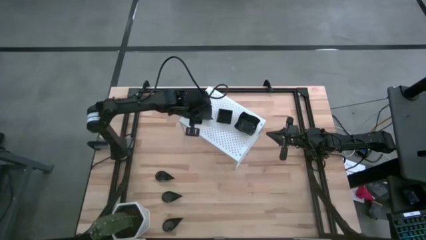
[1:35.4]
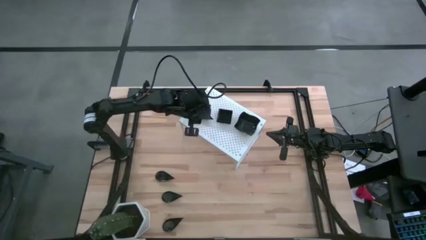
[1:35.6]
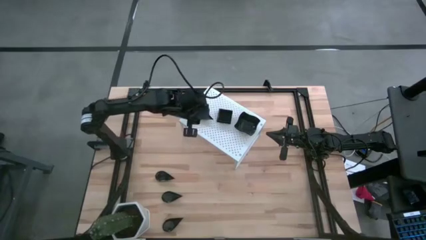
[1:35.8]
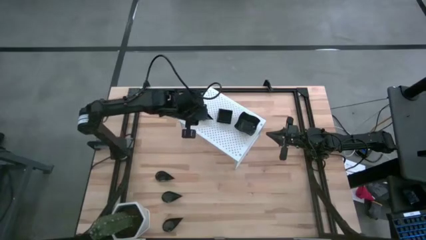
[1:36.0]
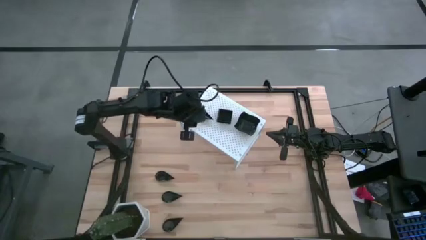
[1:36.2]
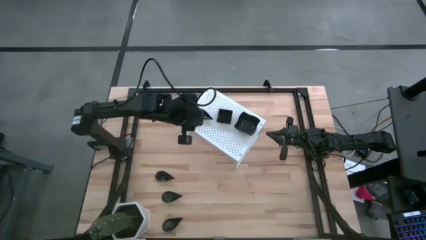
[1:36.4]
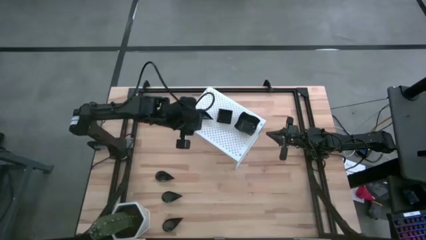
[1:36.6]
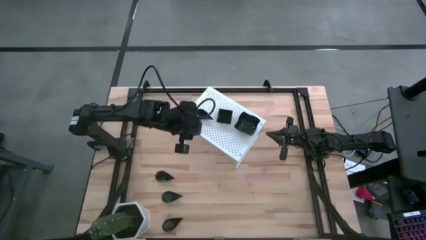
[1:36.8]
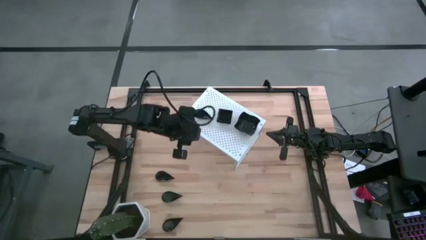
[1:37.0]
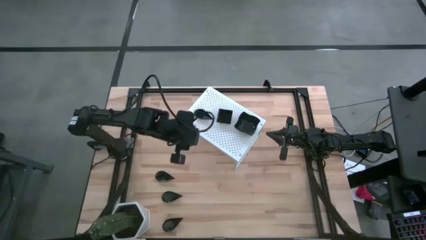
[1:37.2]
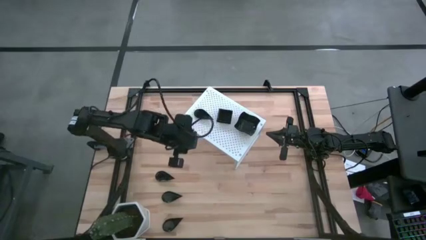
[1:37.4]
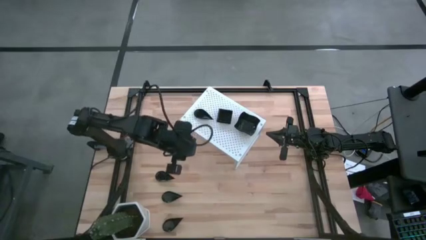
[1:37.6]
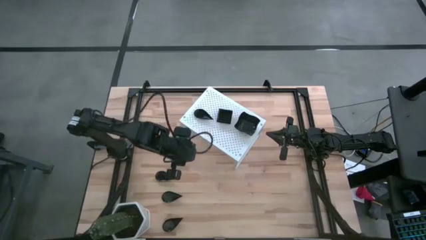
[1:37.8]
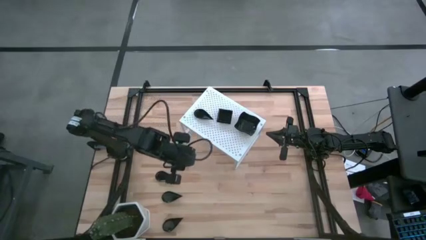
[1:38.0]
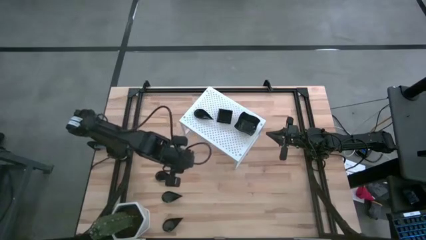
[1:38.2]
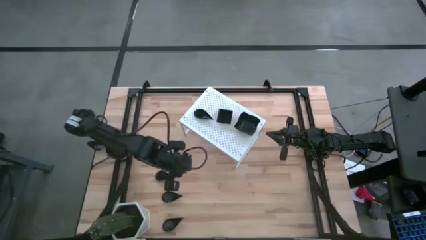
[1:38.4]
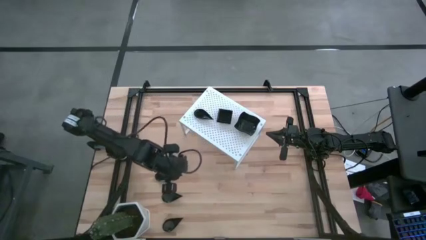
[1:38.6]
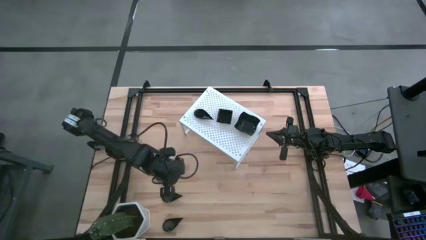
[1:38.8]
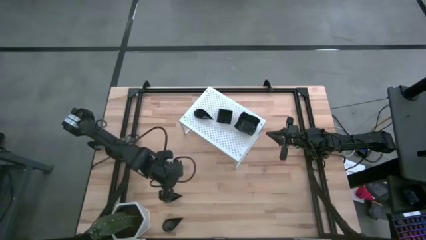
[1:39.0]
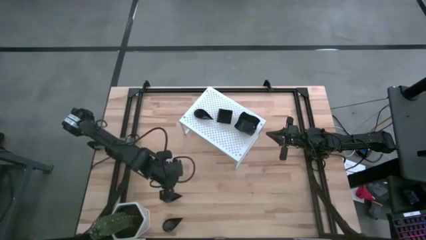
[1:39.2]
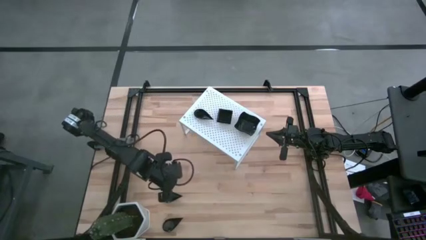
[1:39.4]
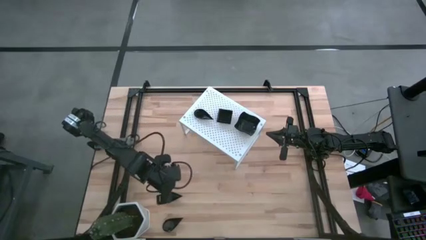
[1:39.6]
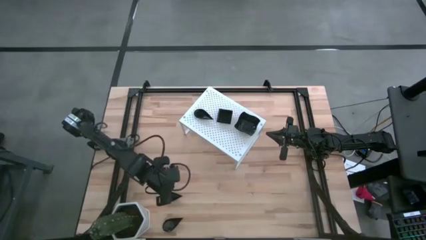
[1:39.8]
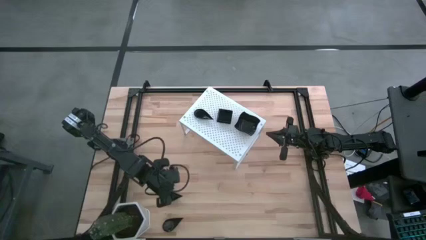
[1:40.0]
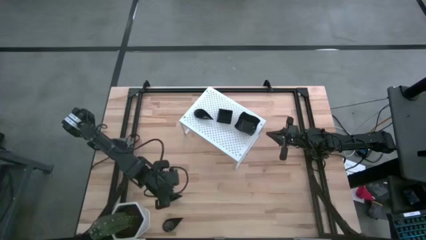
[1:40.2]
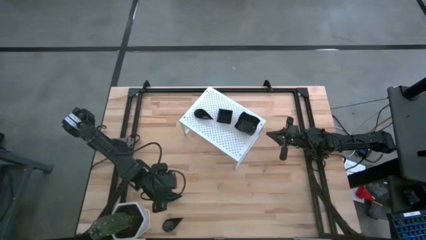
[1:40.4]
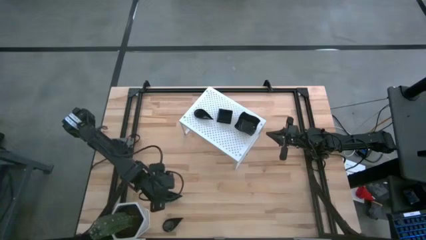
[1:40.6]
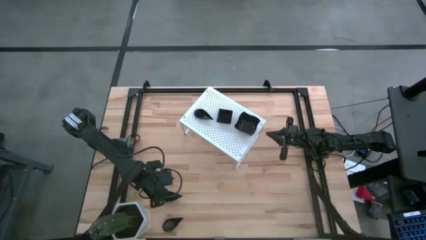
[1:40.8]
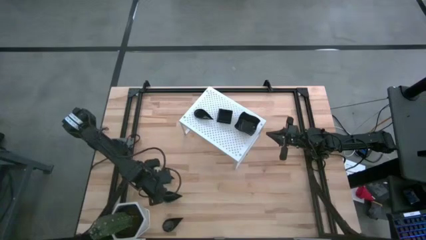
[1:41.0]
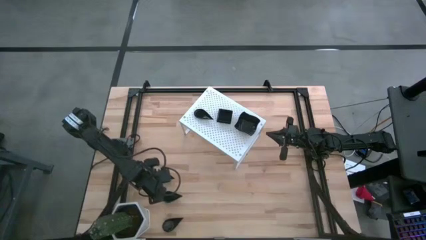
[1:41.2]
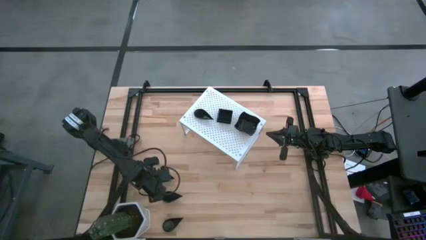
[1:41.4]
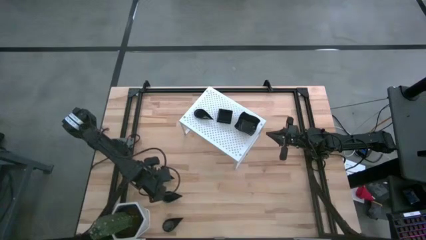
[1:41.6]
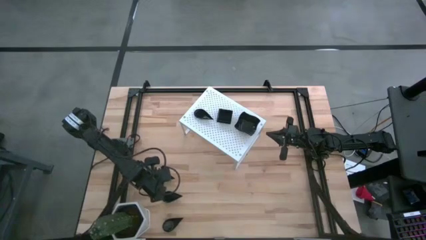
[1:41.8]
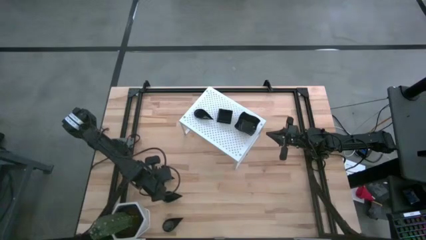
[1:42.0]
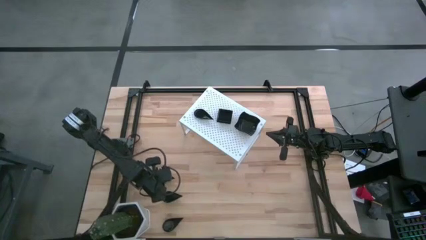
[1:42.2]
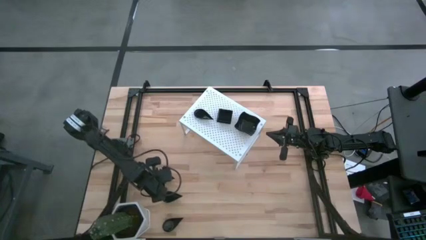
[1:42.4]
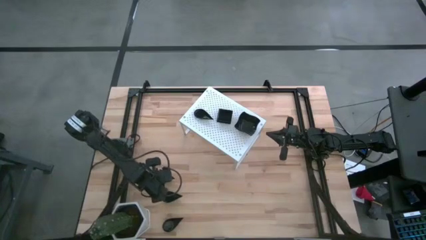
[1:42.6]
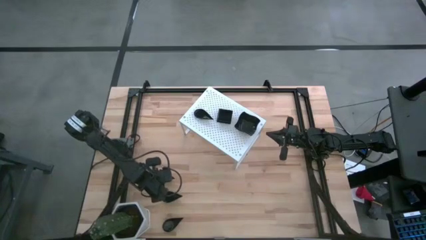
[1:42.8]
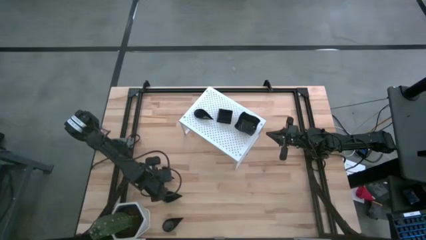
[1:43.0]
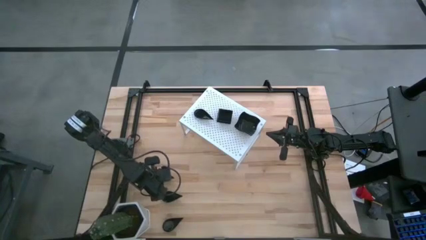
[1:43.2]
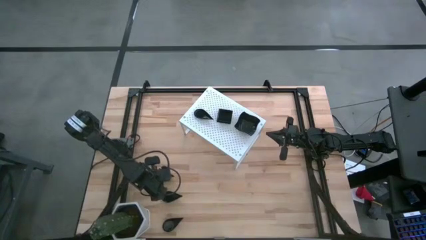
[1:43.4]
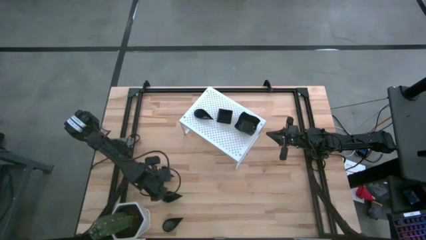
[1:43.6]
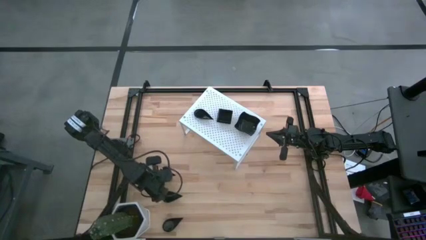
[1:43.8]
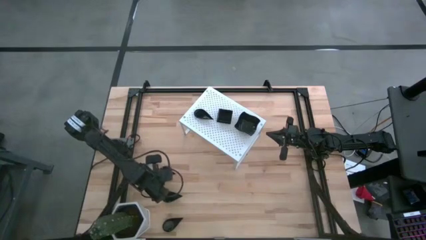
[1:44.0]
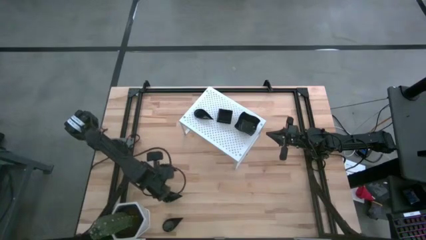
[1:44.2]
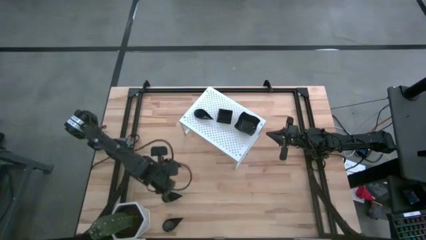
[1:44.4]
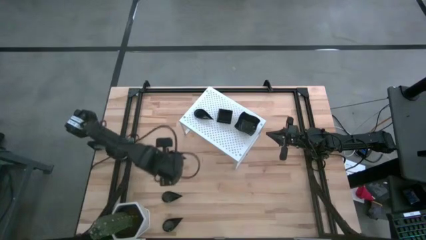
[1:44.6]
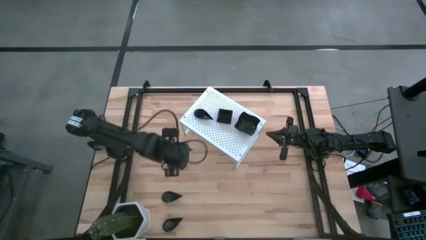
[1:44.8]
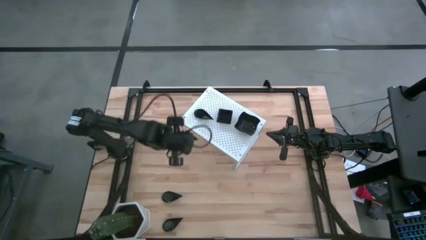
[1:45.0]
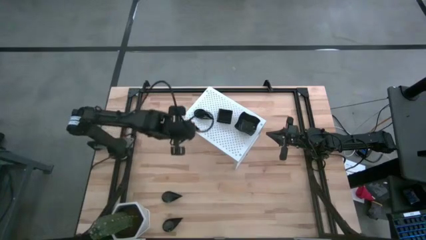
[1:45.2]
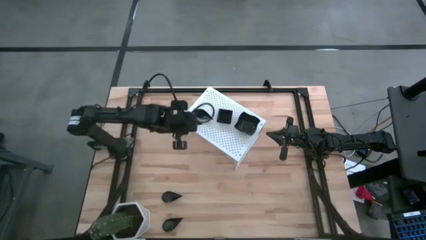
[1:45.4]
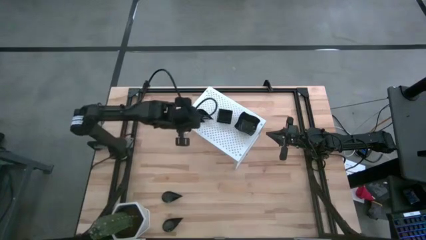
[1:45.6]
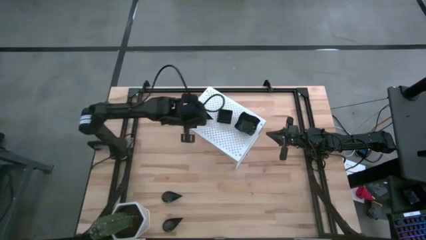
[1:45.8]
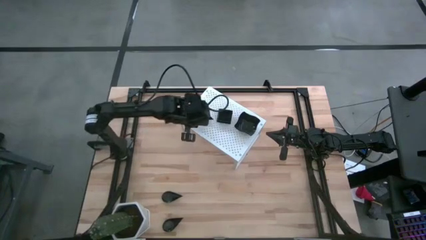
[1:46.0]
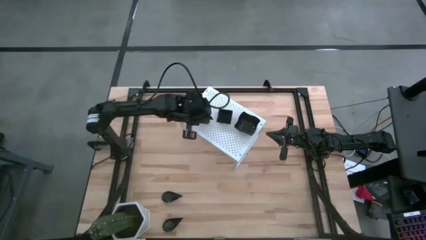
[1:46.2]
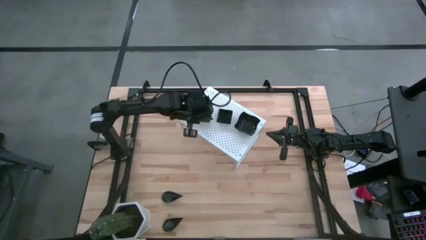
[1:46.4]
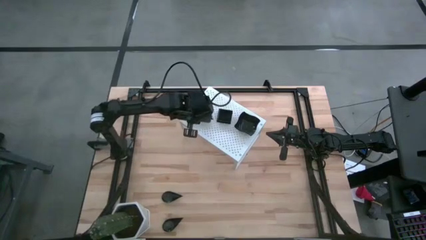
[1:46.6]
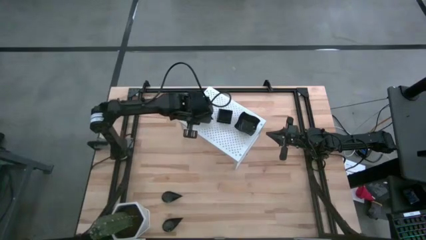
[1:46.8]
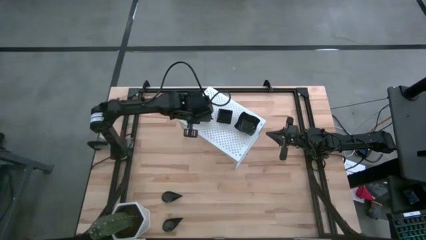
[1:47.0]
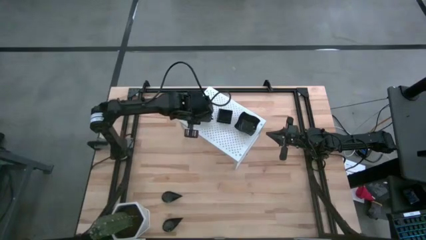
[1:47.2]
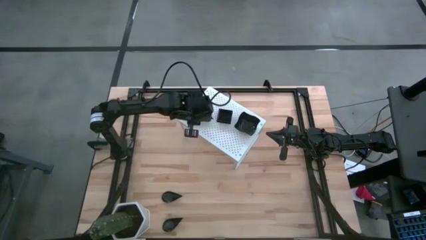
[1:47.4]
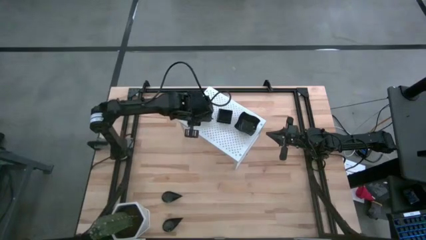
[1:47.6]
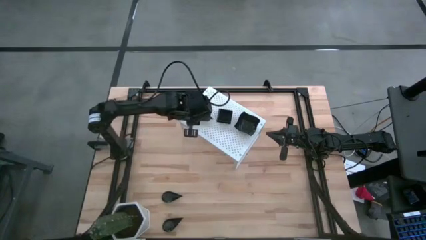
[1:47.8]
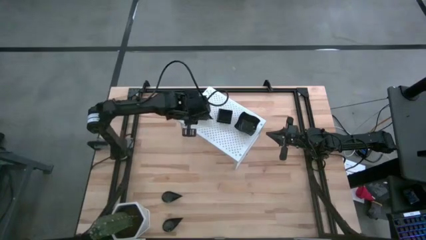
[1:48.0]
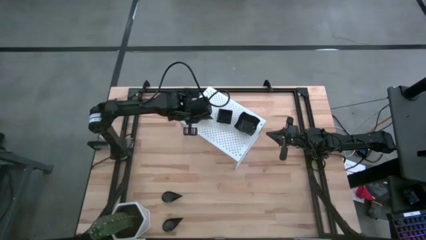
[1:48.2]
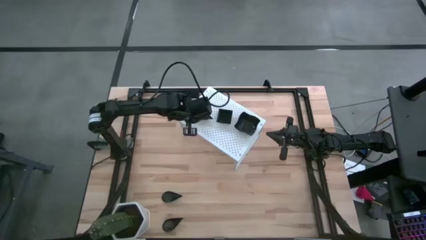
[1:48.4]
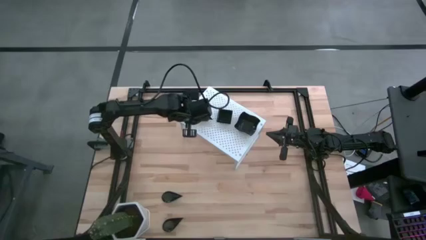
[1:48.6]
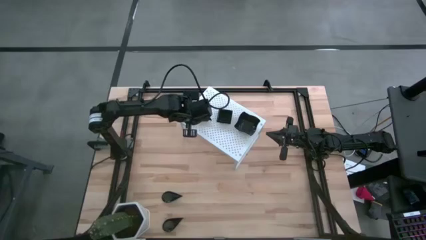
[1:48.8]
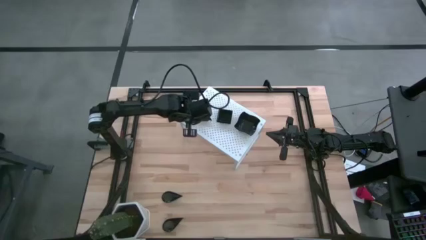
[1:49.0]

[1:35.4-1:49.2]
Task: Pick & Place Mini shaped plates
Stack the drop shaped plate on top of the other drop shaped plate on the shelf

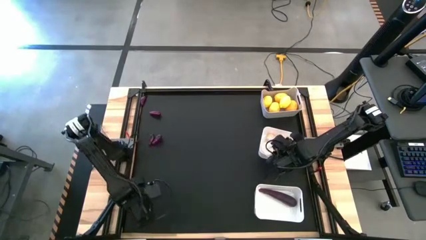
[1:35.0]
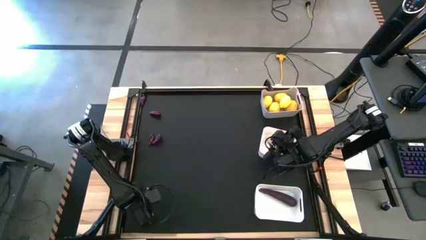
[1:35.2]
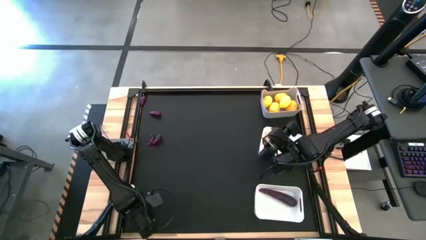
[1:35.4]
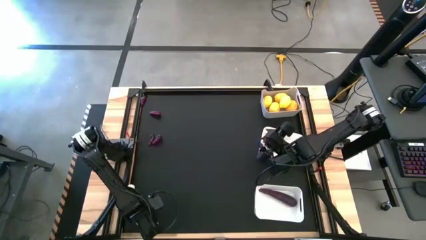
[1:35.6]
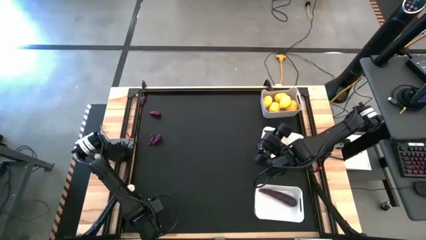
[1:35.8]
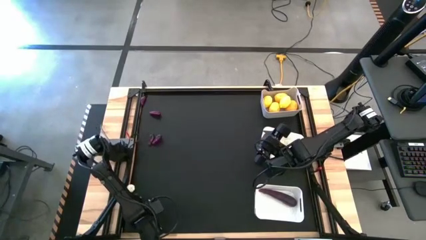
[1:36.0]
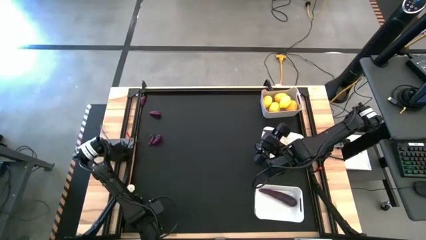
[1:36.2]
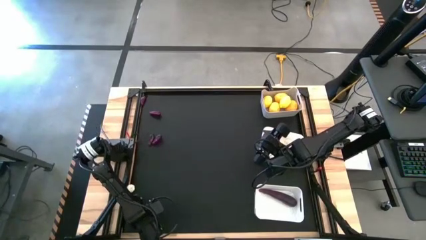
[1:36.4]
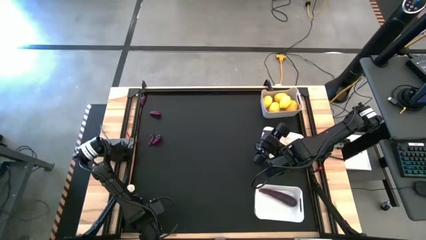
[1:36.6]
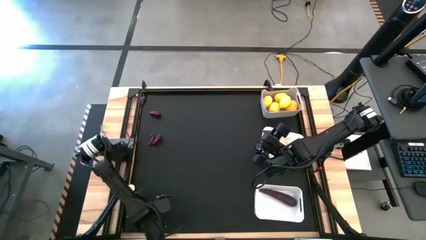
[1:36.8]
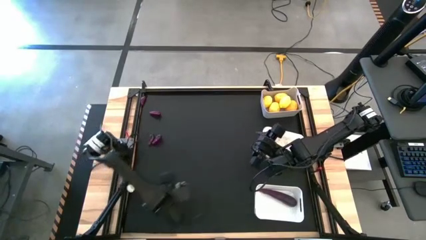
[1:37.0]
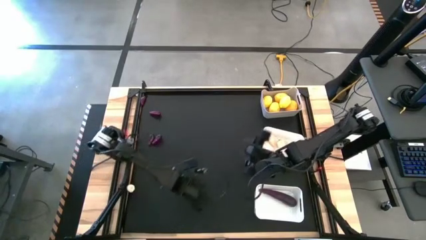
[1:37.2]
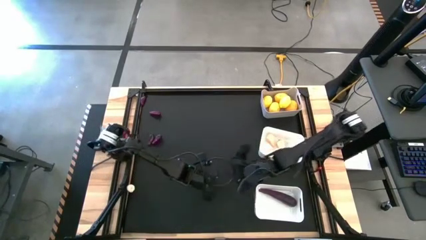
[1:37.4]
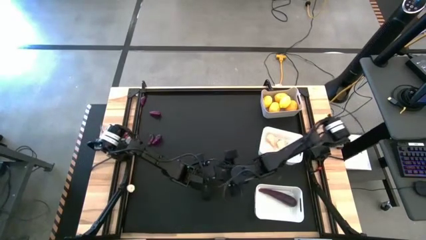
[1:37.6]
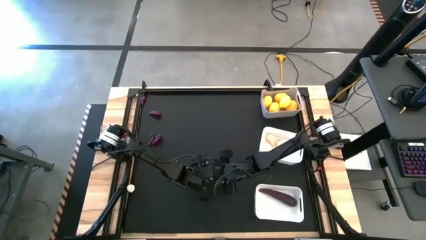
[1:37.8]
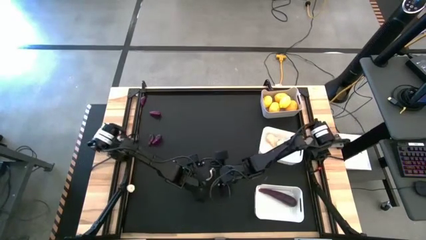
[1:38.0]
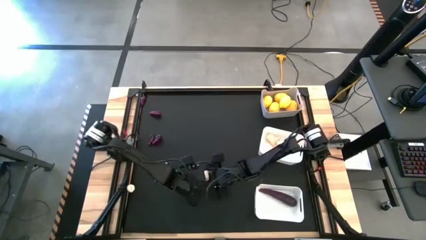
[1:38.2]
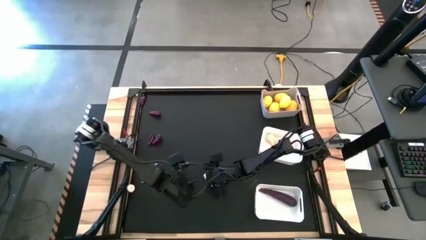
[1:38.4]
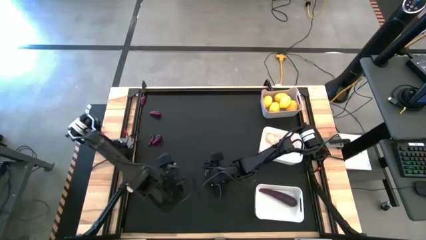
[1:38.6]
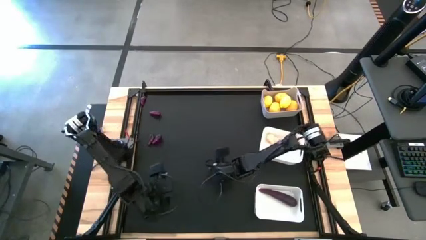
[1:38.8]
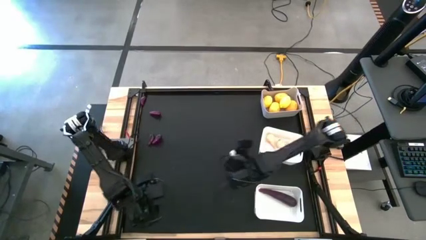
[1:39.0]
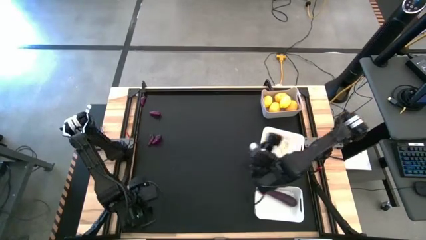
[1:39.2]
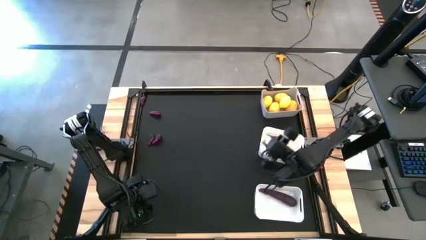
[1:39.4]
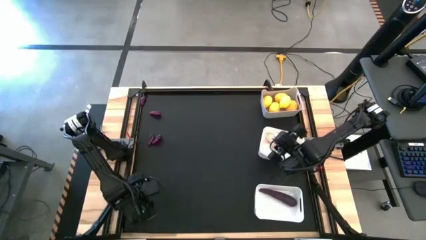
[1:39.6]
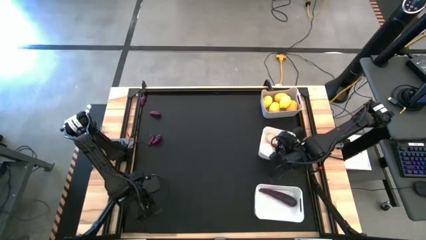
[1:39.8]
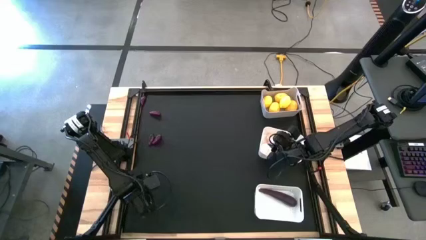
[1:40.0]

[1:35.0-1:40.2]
Task: Sort produce into baskets
Put the garlic into the top white bin
